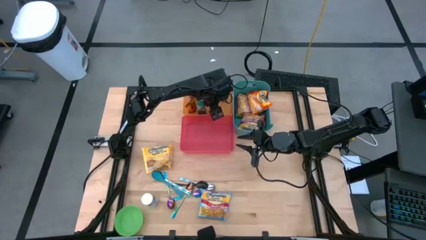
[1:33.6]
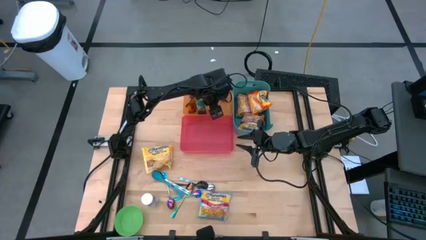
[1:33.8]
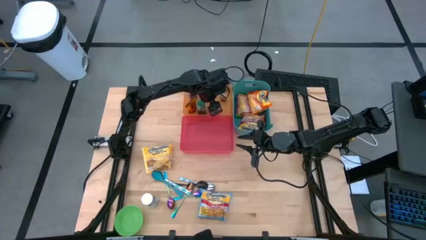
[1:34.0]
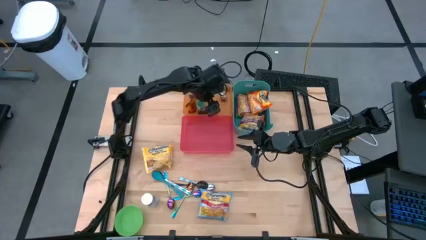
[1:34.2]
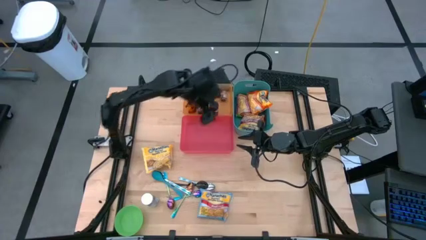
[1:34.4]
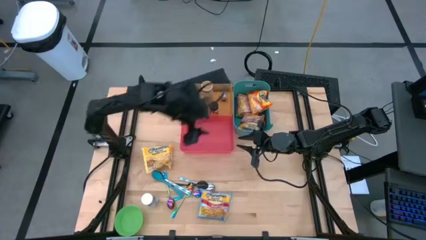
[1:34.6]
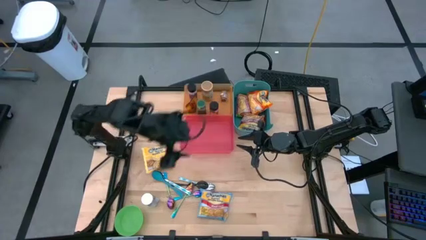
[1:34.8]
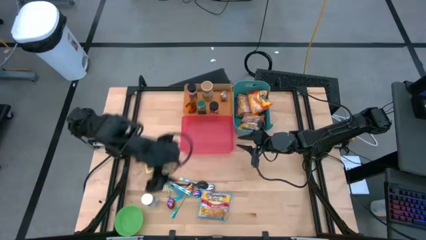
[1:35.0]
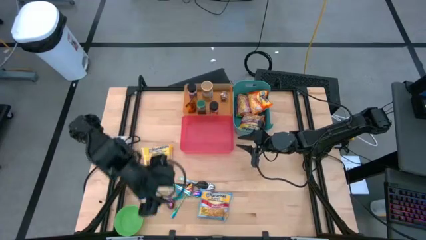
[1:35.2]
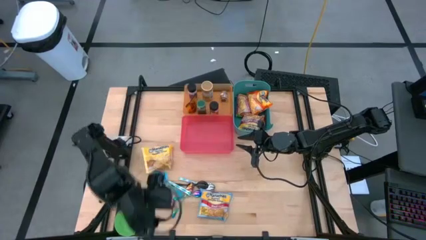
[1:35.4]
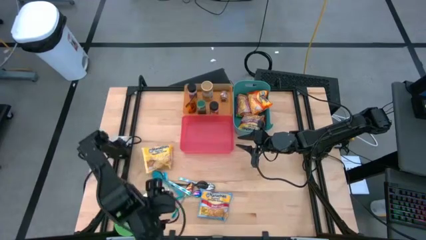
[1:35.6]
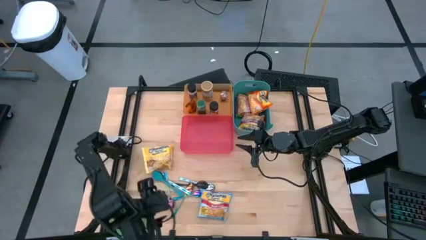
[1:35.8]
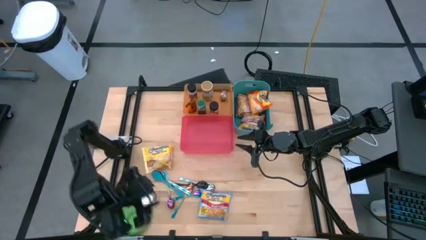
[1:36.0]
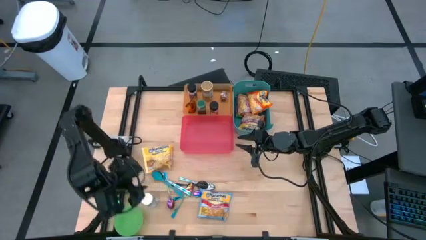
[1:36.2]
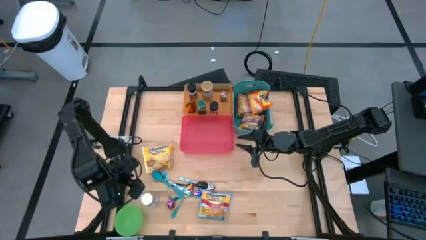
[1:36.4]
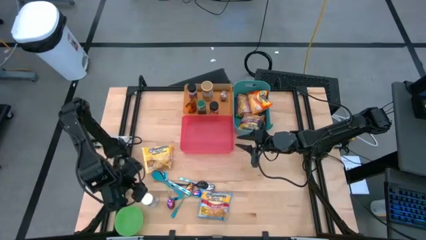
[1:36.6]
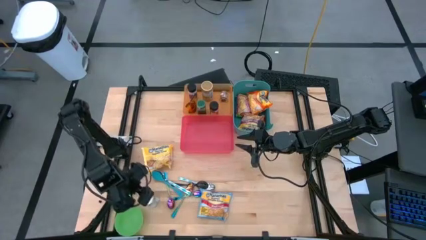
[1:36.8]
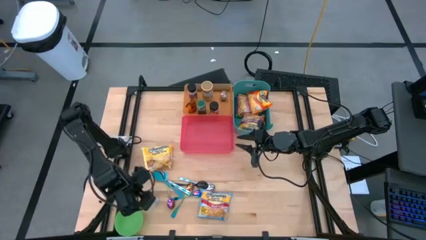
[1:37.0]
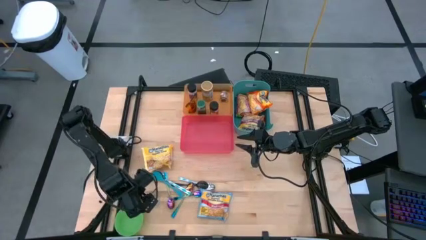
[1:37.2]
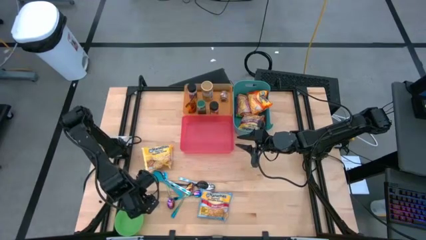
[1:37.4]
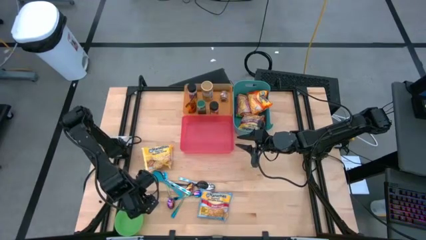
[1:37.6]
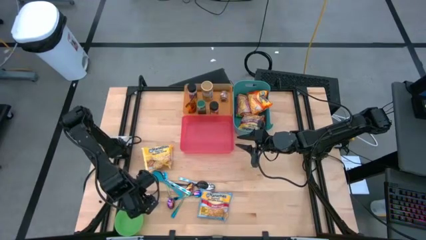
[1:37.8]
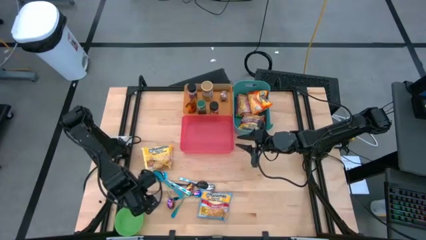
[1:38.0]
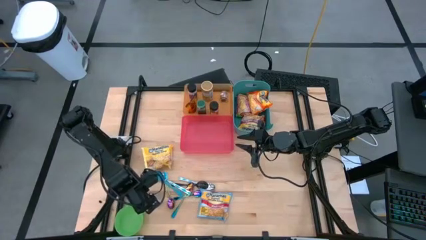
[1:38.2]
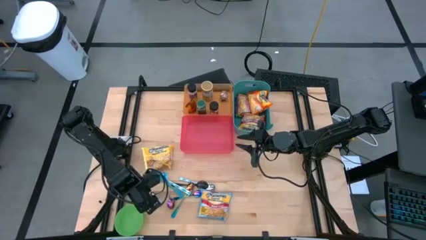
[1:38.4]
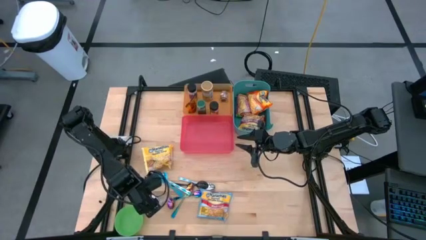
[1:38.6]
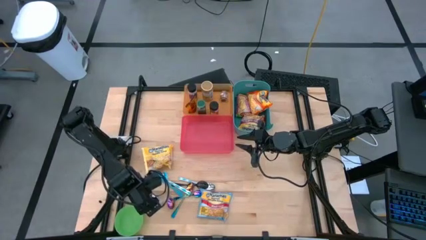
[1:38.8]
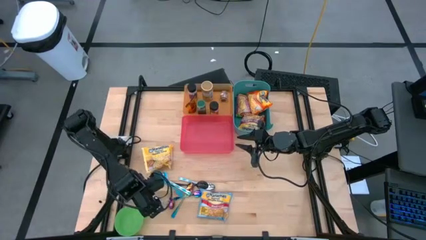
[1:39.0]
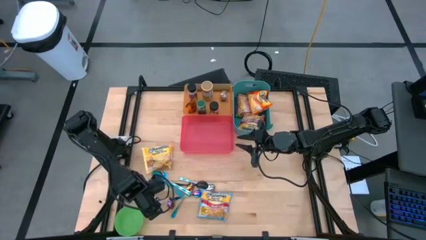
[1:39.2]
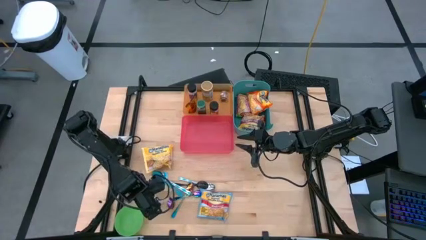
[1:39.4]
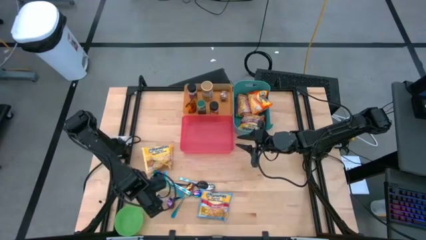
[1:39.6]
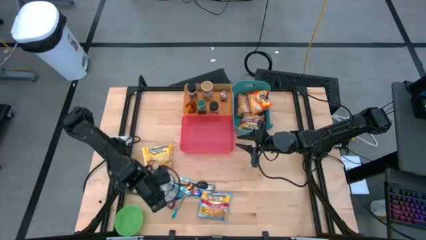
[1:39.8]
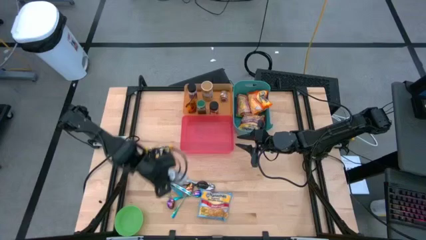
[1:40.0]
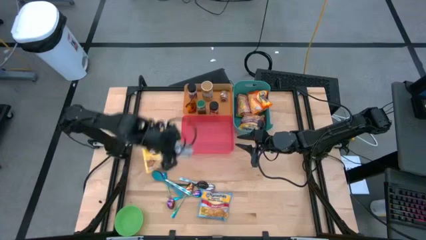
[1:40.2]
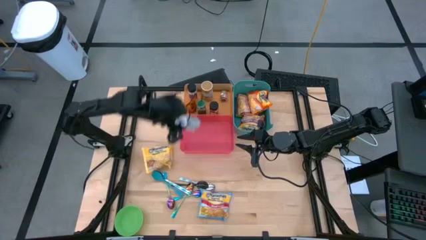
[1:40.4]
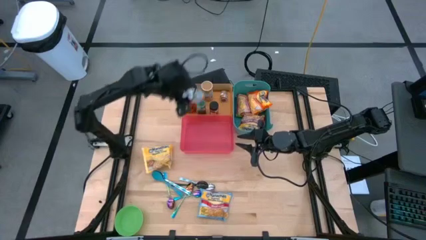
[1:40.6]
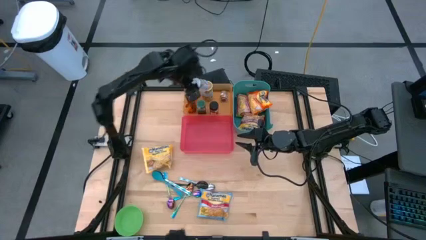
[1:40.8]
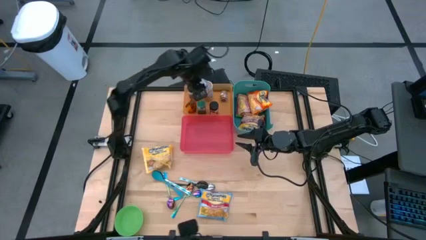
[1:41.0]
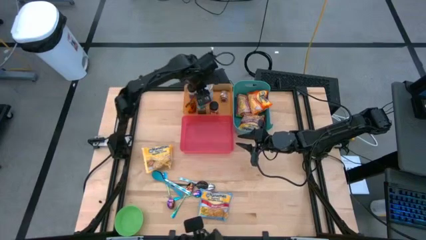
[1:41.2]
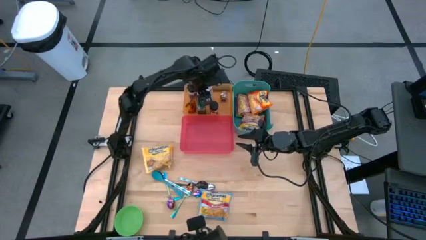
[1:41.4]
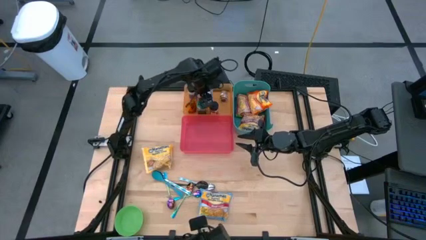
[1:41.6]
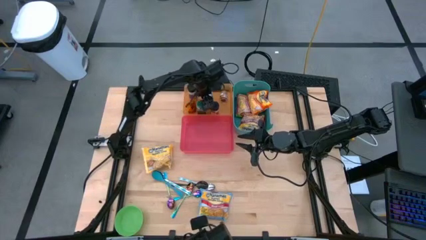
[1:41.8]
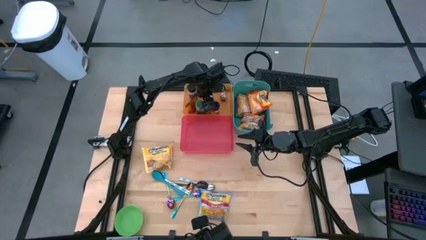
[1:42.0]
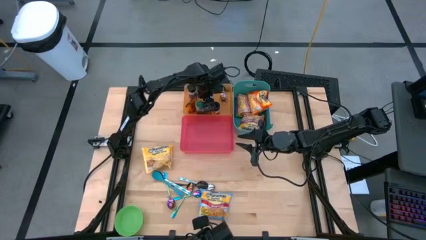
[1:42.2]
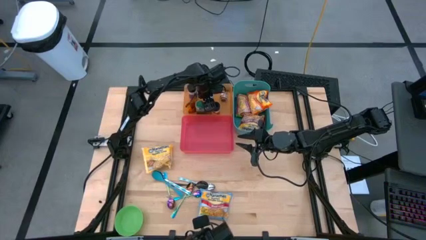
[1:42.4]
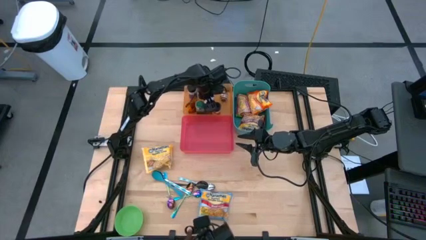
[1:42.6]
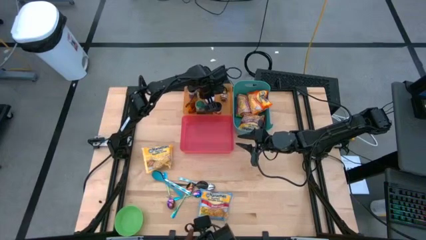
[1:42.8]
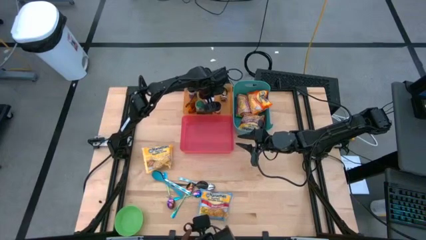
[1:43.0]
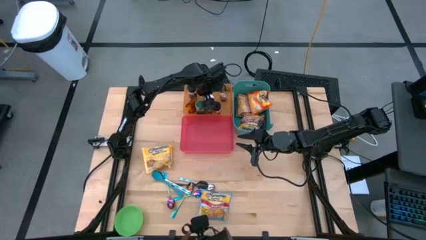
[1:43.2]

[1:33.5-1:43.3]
Task: Pick & Place Food Item
Put the white spice bottle into the orange bin

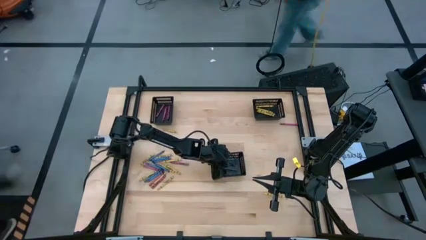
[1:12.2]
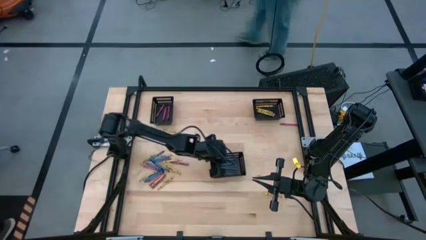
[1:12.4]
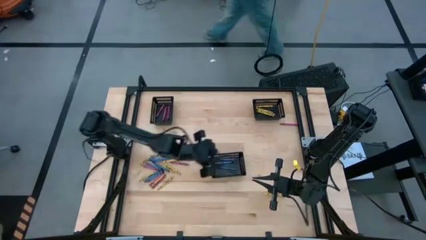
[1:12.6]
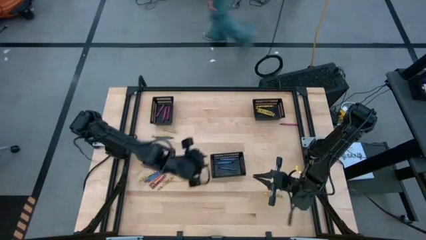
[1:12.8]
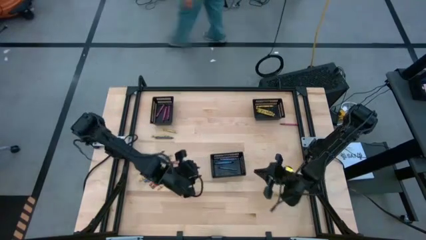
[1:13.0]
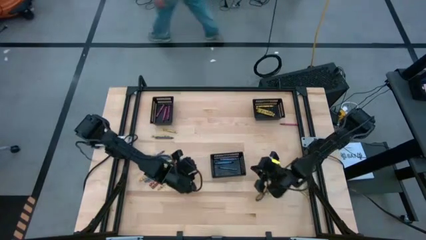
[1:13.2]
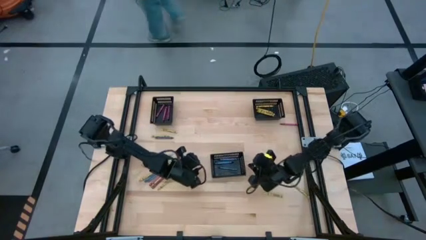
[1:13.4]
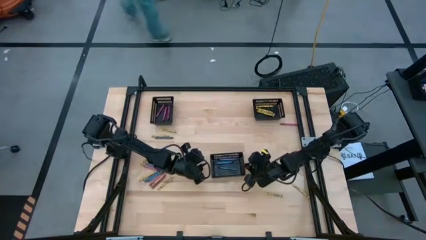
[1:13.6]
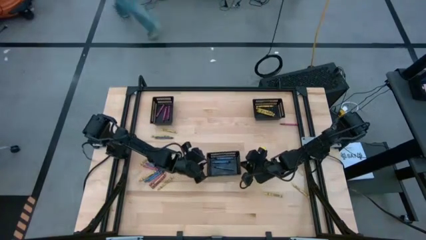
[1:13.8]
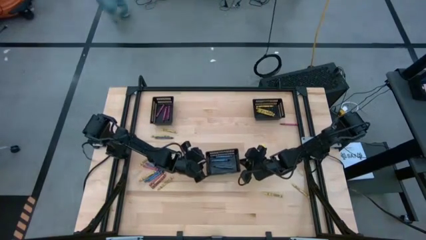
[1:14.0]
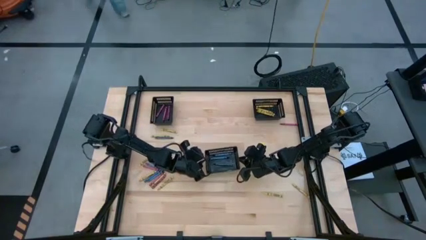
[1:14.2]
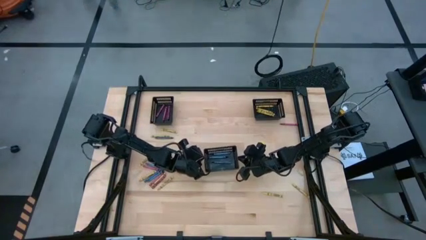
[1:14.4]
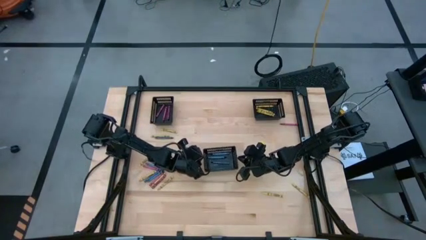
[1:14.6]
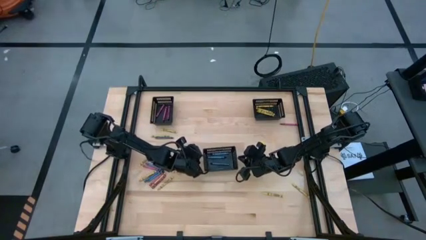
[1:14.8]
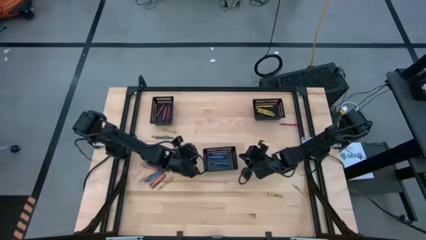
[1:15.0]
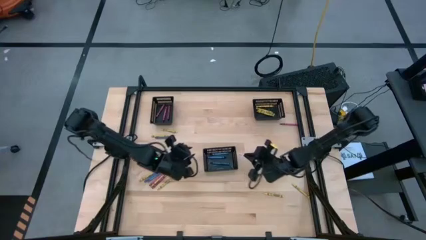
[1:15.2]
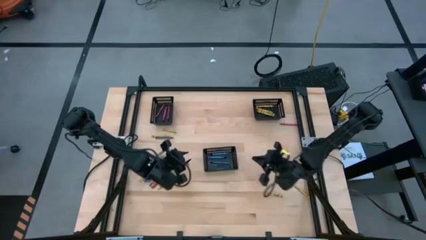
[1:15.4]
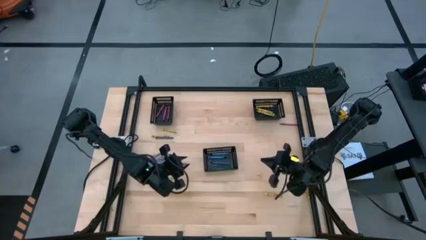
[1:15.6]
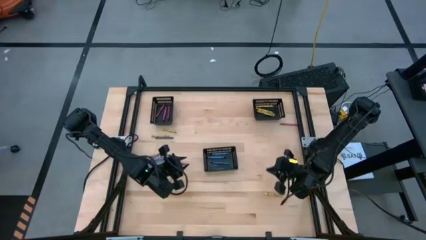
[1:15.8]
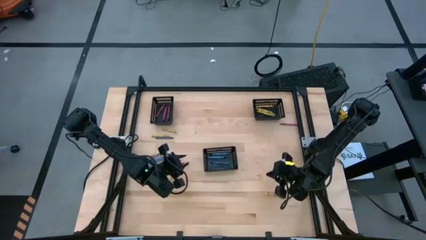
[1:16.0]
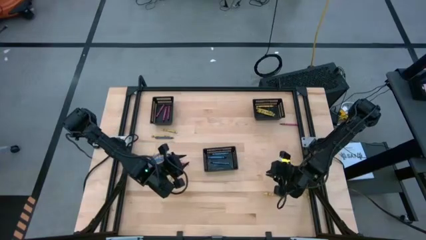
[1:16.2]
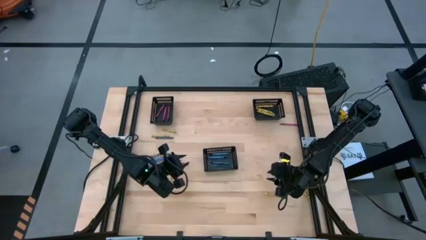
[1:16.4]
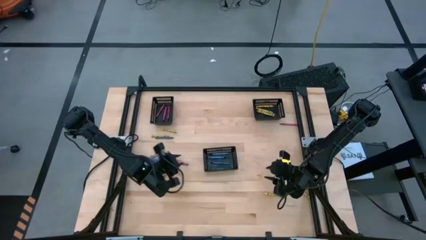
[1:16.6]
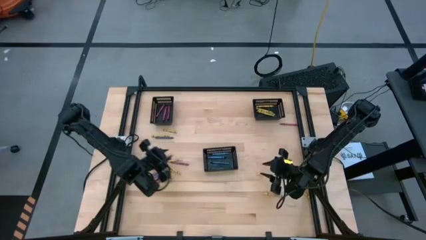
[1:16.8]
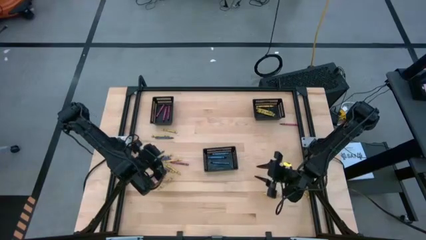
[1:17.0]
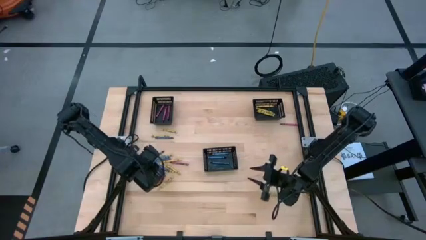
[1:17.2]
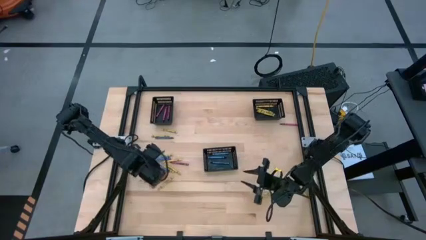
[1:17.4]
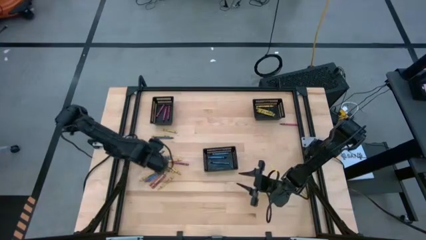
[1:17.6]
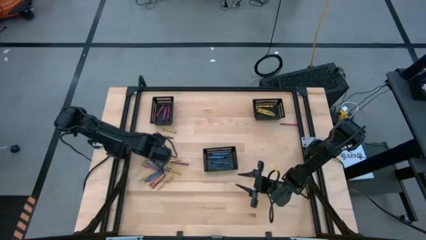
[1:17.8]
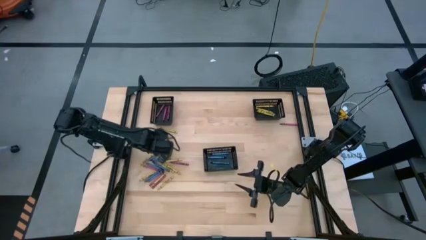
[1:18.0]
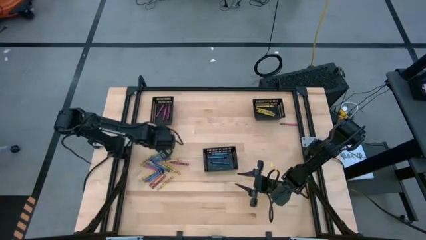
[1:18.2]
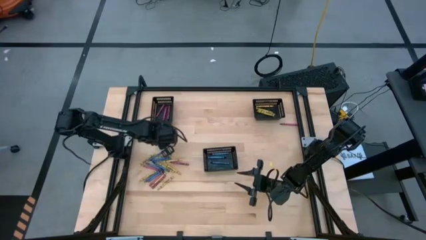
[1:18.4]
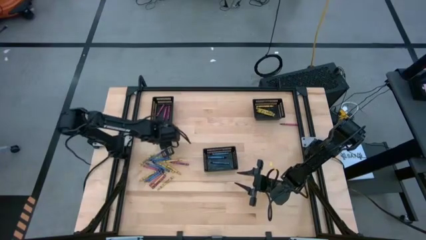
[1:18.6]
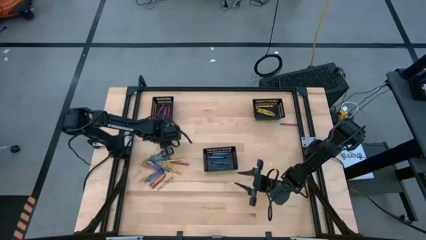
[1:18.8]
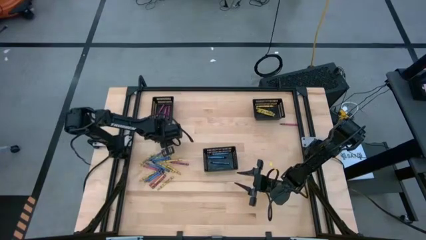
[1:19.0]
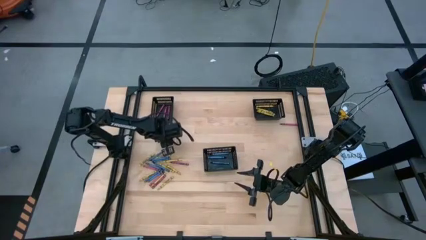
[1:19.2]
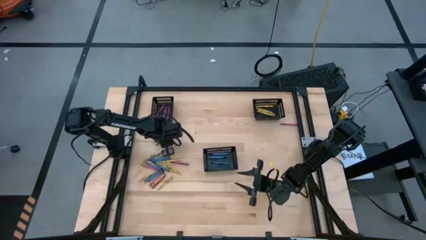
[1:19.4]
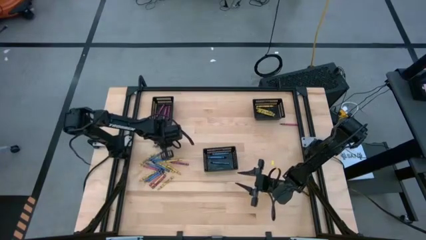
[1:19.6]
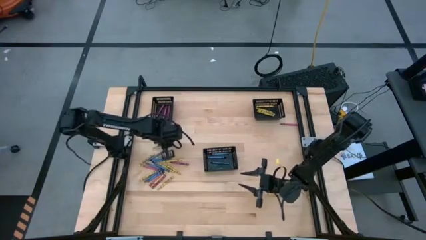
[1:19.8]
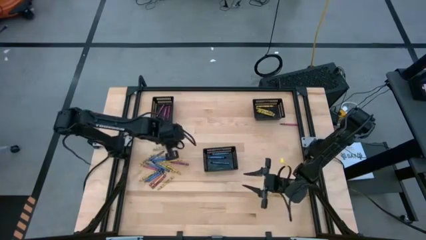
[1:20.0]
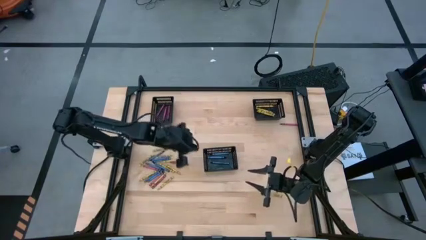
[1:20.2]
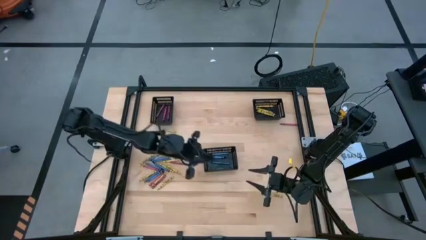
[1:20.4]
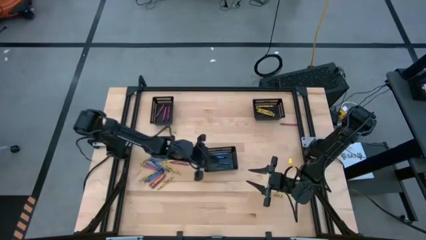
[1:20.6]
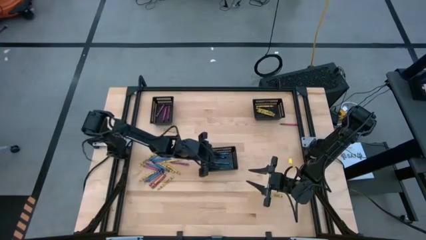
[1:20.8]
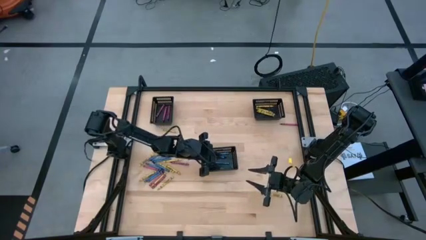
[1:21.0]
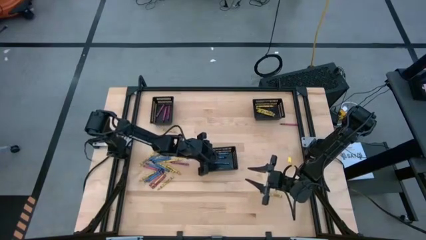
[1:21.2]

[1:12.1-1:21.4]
Task: Sort crayons
Put the blue crayon into the bottom black bin
